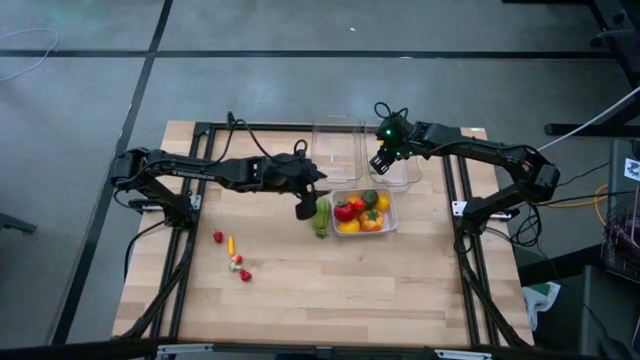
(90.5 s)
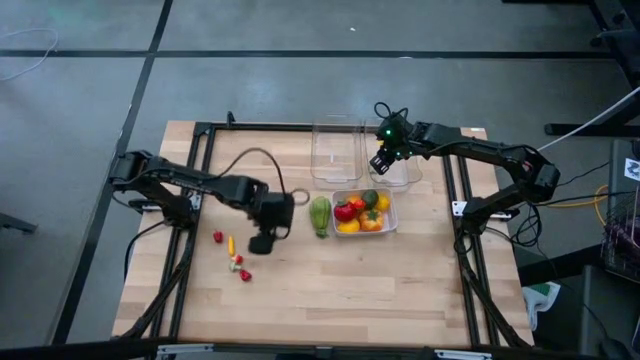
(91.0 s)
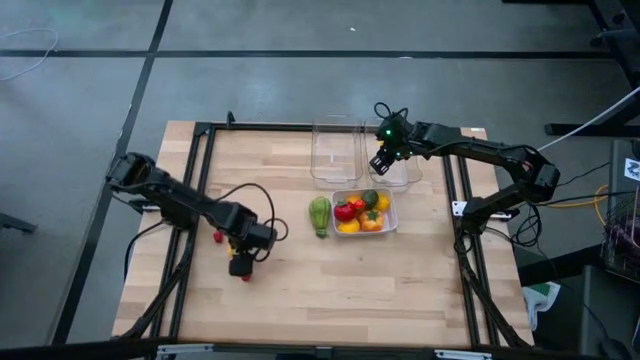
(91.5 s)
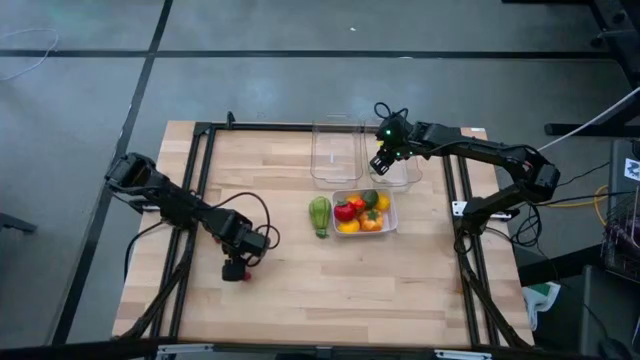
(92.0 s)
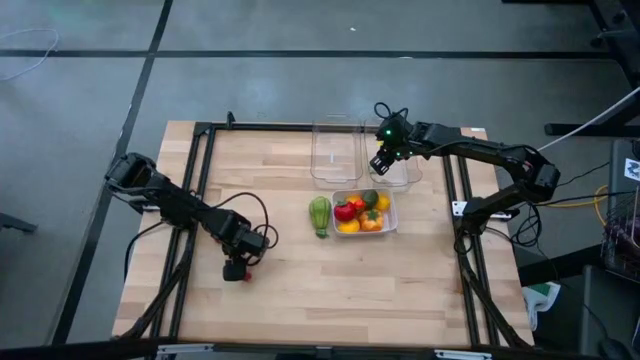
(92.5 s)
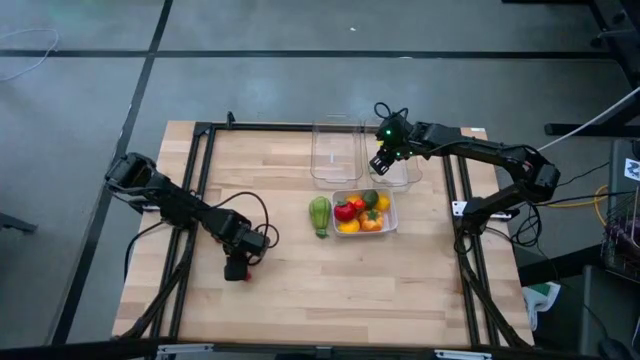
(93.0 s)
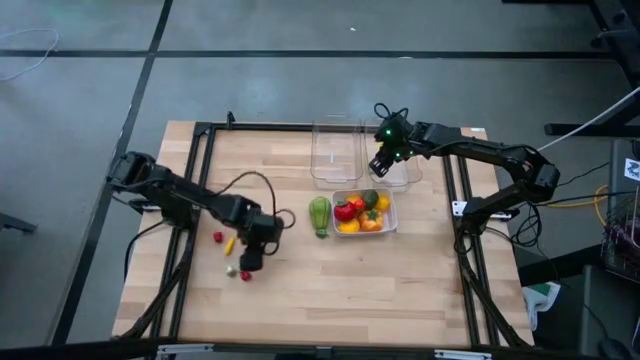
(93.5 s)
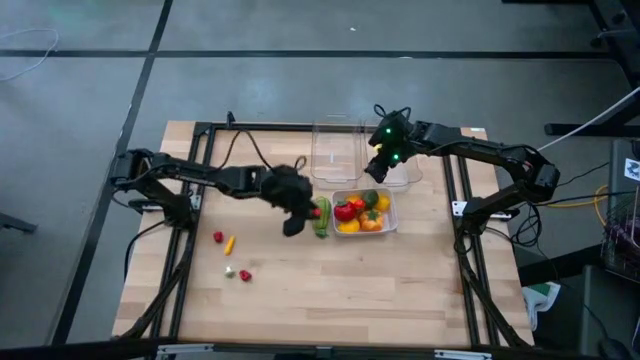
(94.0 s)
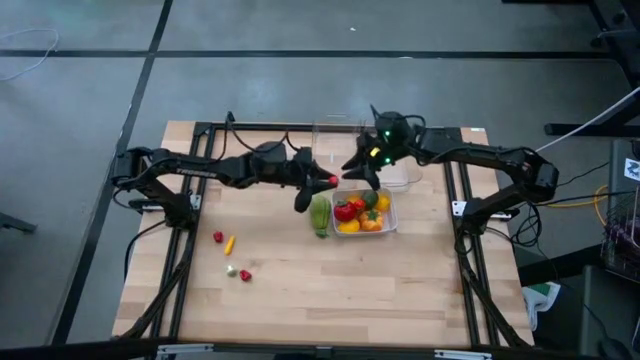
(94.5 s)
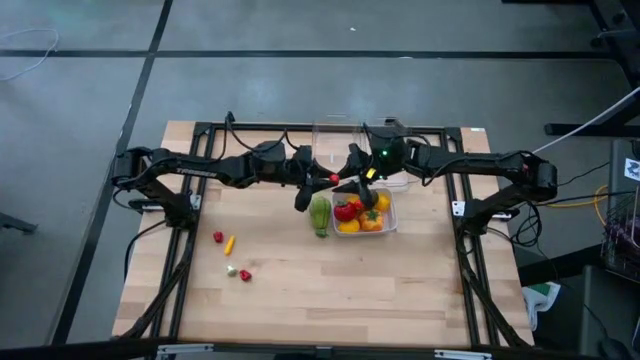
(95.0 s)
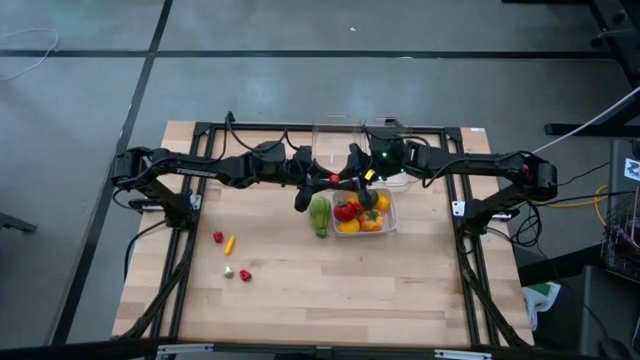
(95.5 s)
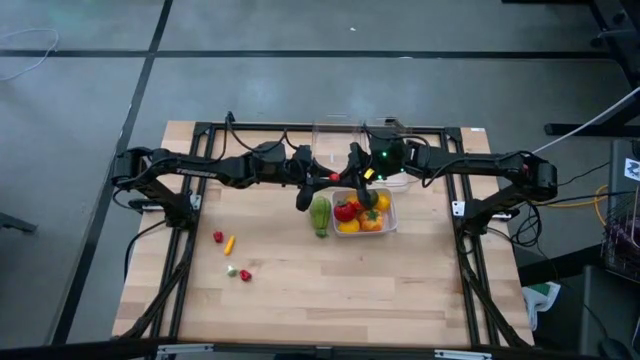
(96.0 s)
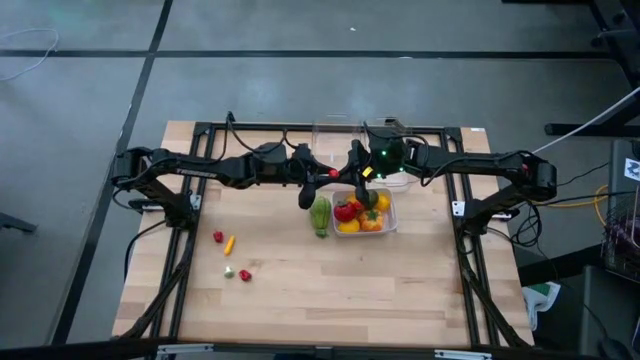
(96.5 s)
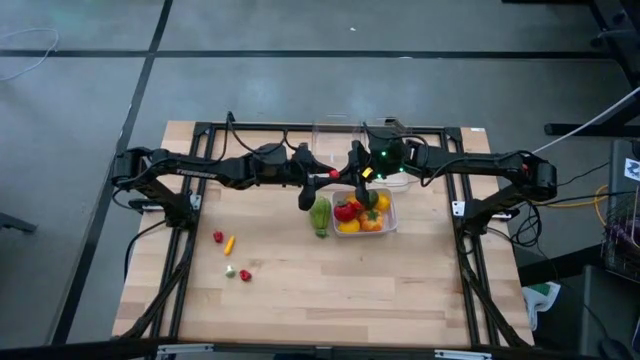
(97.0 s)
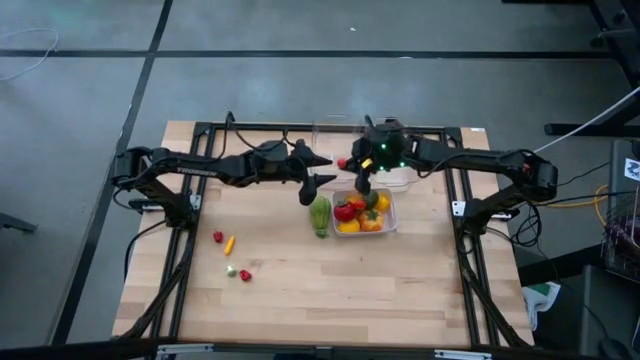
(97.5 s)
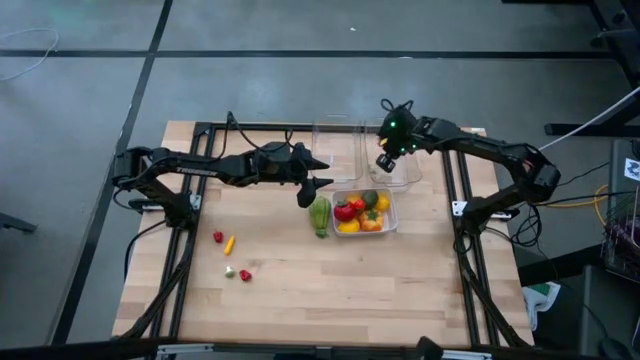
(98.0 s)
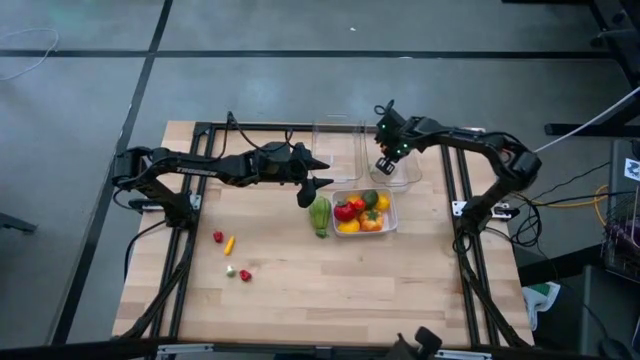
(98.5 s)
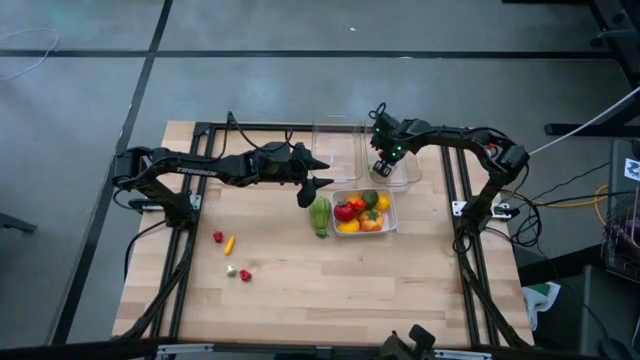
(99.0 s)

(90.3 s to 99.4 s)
Task: Sort produce into baskets
Put the red mushroom into the right transparent bin

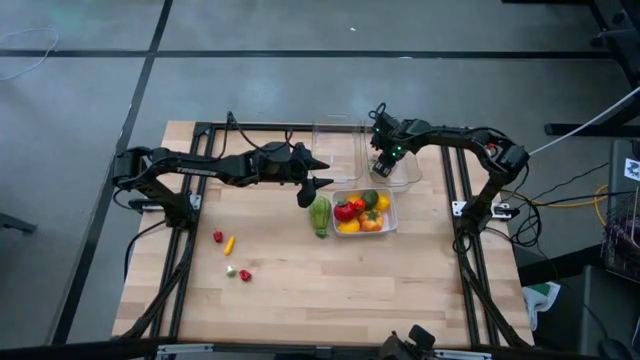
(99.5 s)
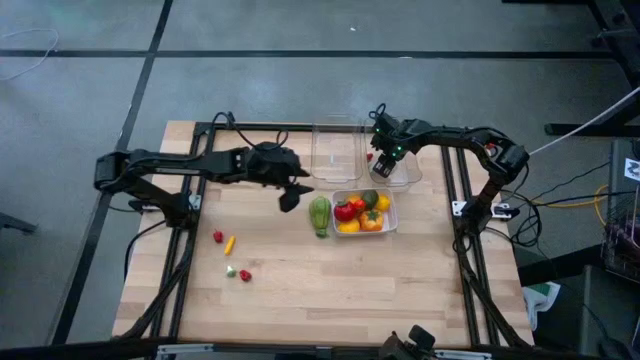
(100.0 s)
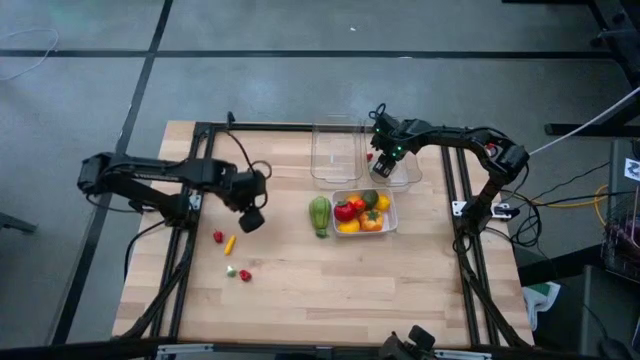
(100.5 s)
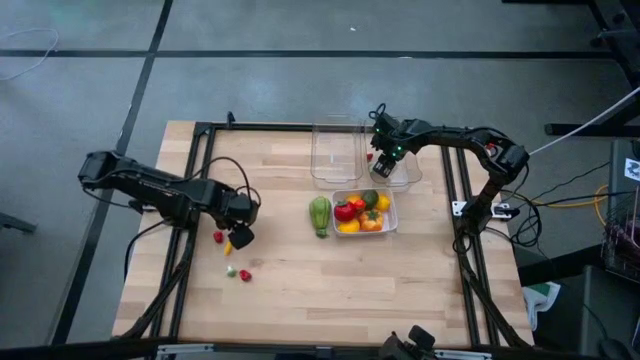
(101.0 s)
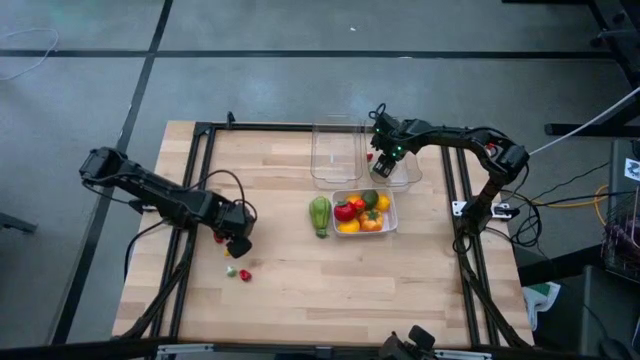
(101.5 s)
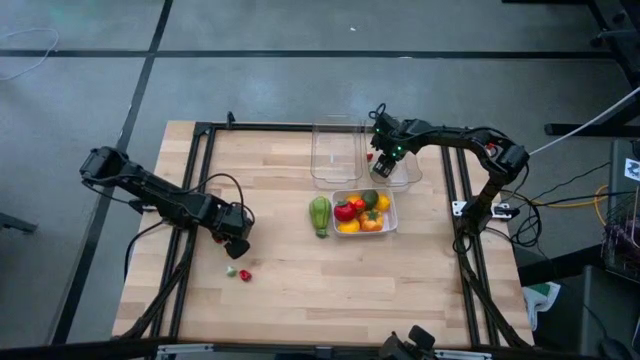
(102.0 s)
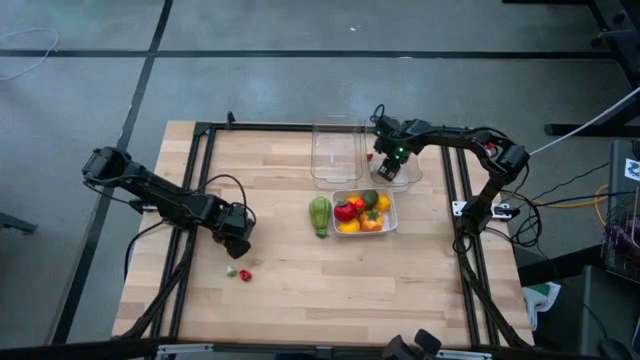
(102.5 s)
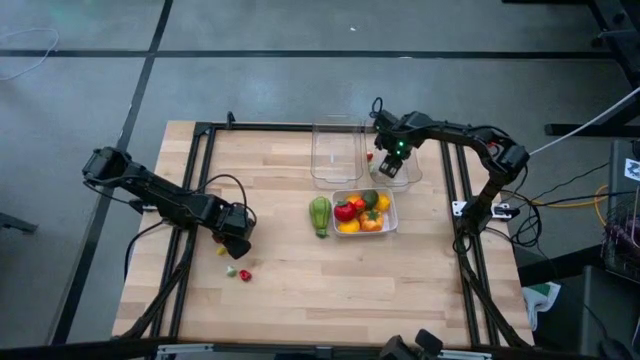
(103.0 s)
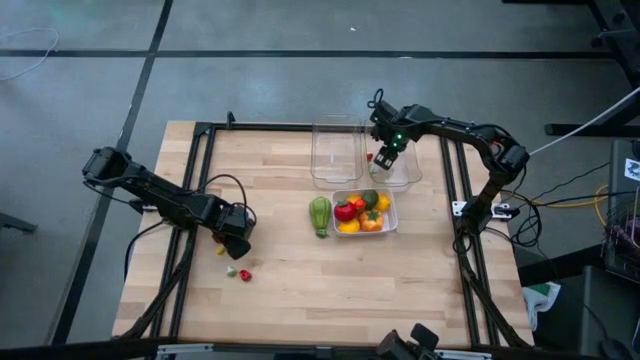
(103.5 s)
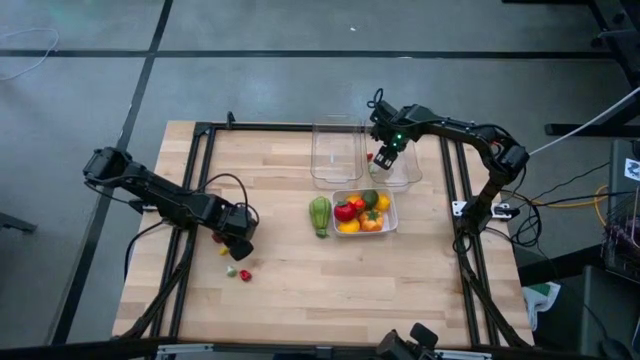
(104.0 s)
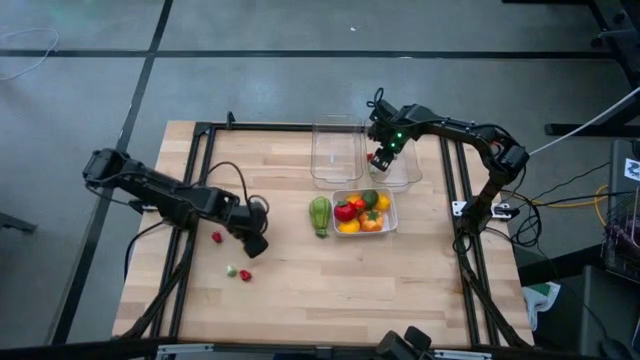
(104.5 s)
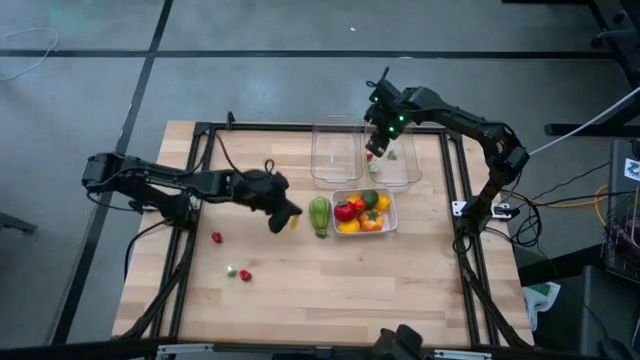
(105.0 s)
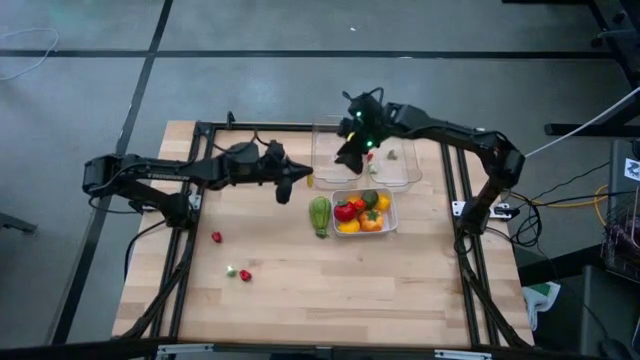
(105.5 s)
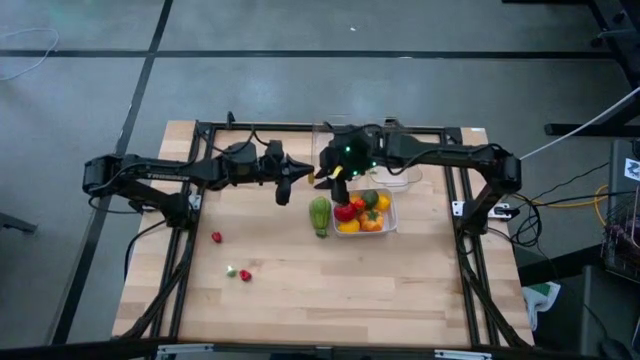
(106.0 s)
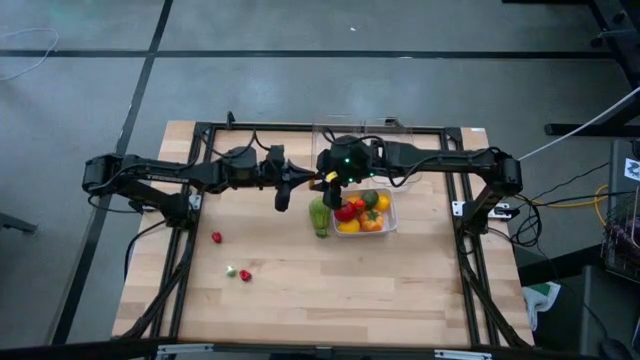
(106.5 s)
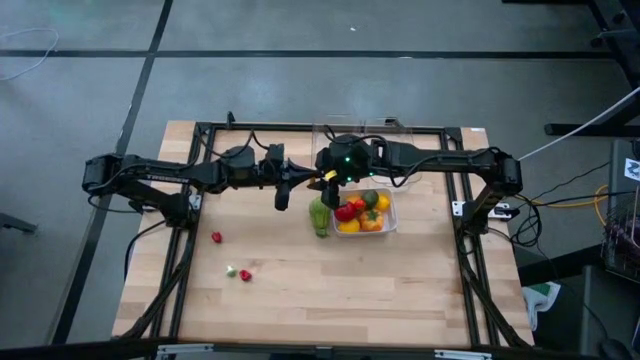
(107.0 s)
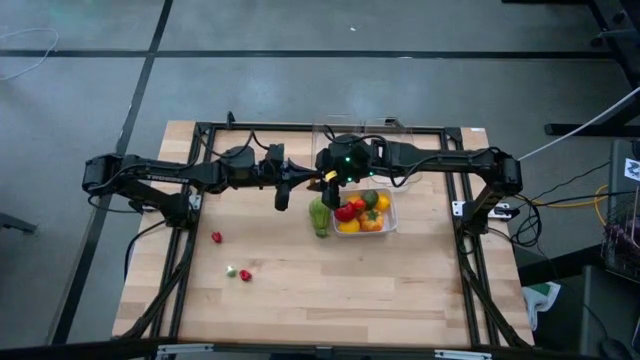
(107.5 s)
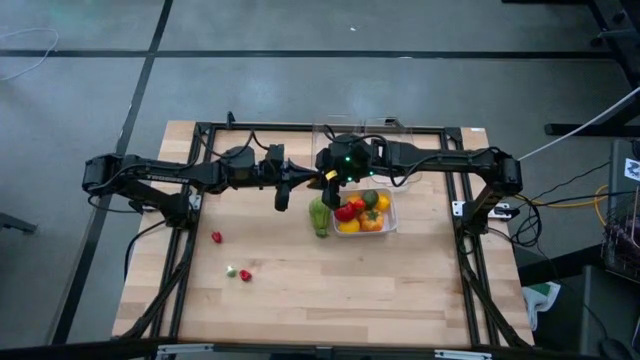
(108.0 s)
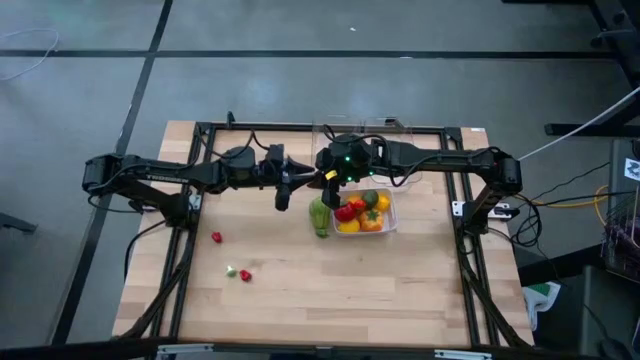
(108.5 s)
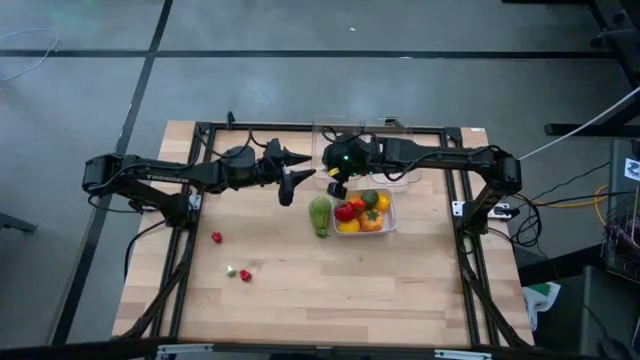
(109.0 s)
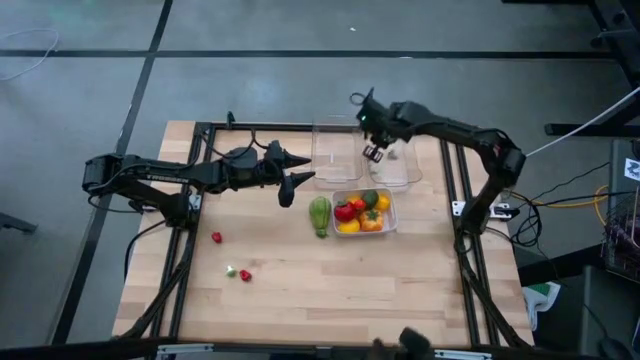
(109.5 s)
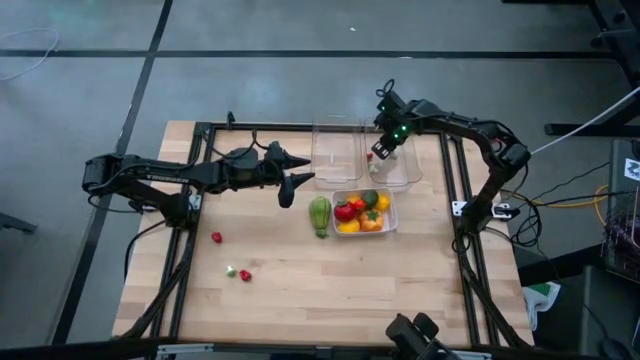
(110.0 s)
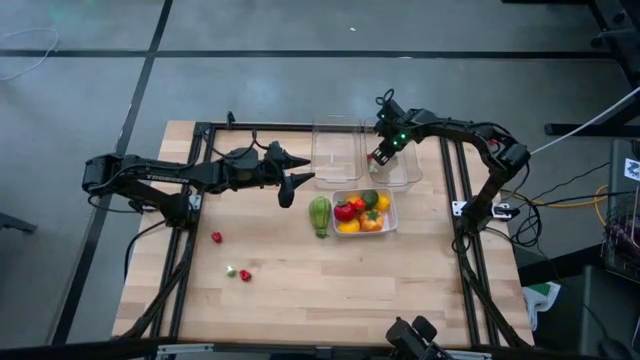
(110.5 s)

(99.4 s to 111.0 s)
Put the corn into the right transparent bin

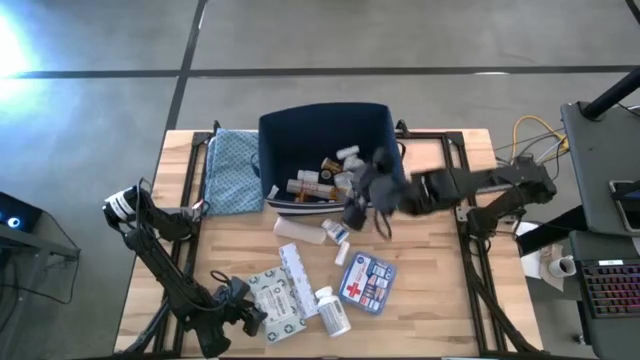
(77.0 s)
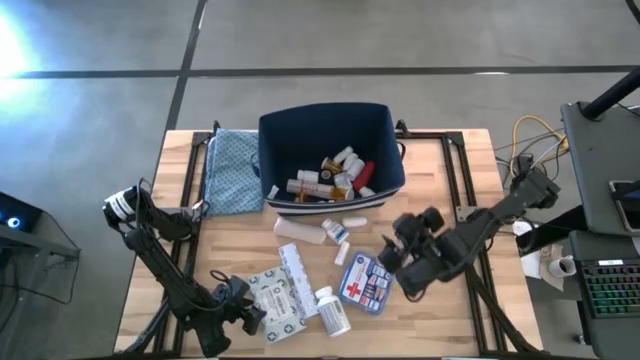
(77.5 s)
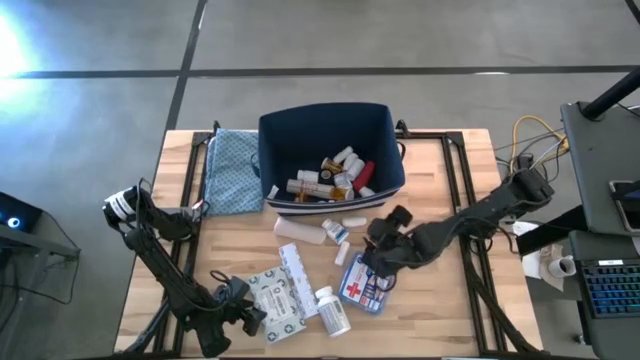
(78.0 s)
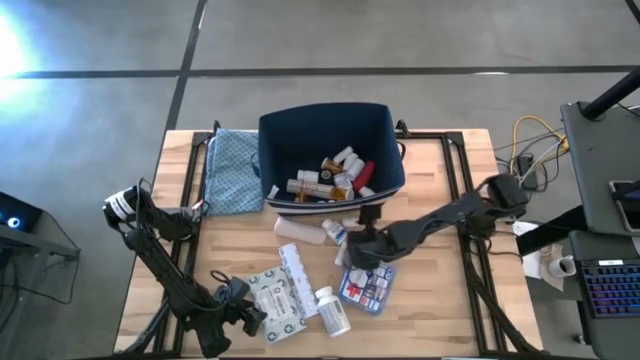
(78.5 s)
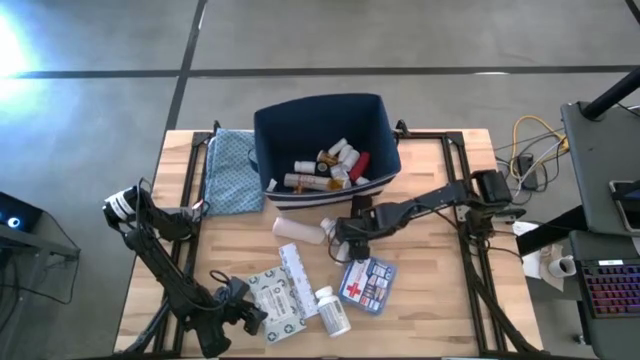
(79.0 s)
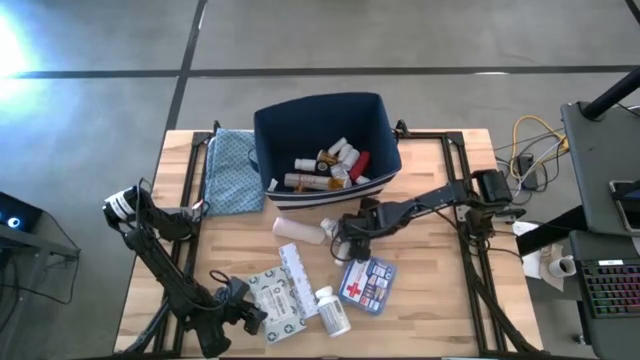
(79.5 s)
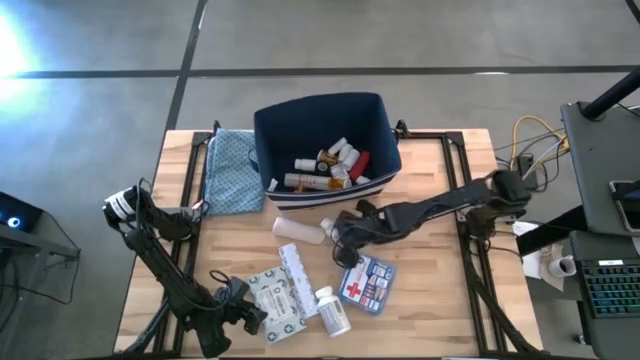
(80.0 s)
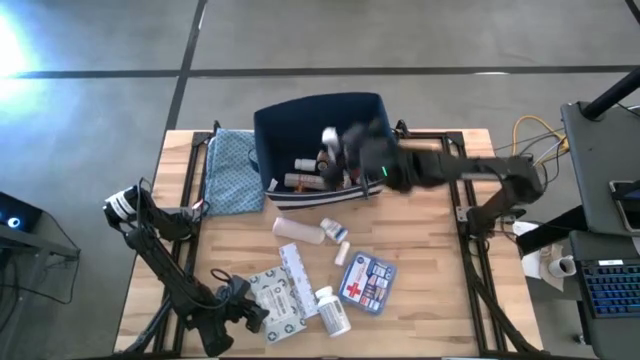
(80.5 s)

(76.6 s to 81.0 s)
Task: Pick & place medical supplies in basket/bin
Put the white rolled gauze into the blue bin
